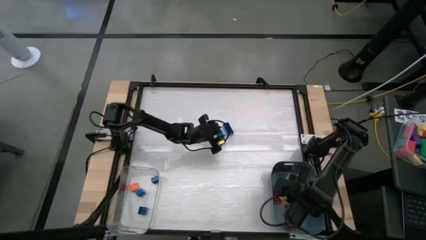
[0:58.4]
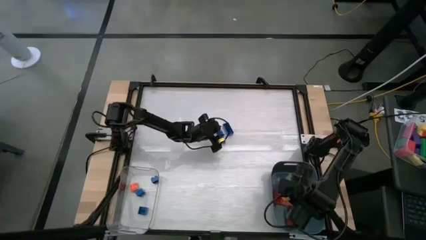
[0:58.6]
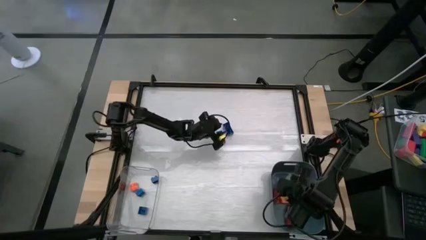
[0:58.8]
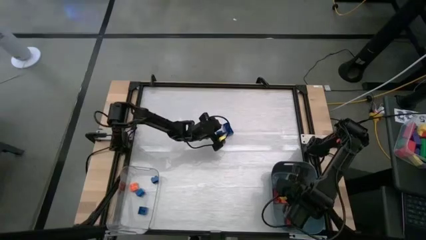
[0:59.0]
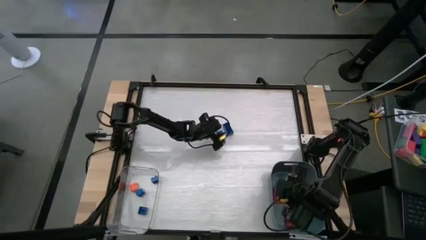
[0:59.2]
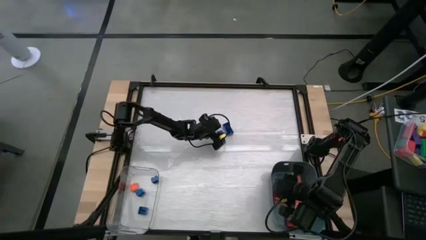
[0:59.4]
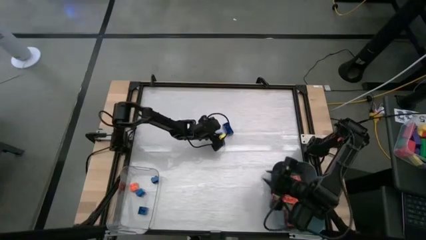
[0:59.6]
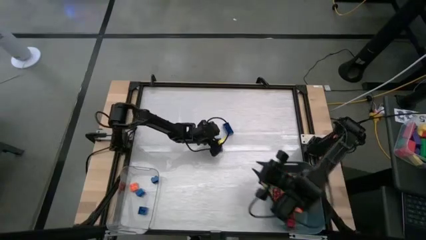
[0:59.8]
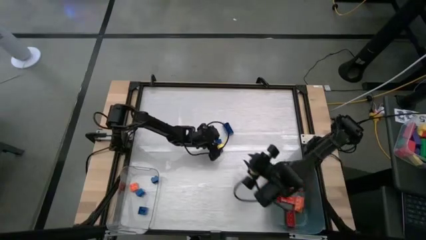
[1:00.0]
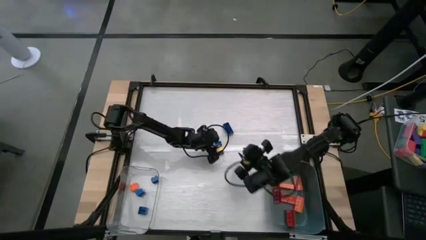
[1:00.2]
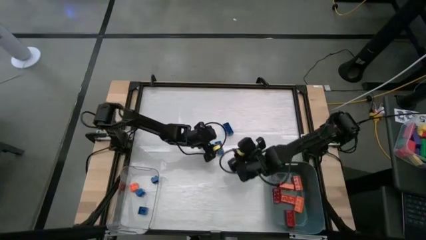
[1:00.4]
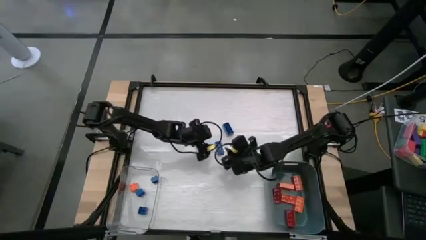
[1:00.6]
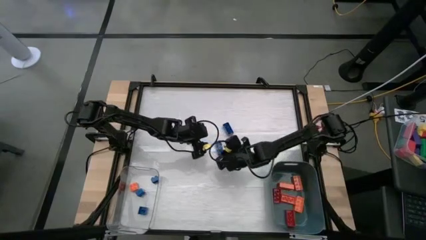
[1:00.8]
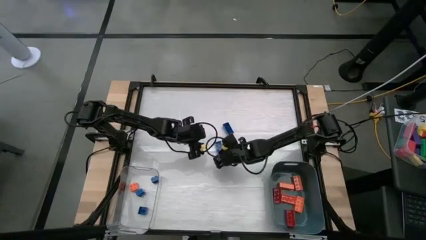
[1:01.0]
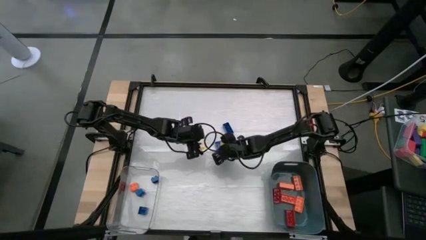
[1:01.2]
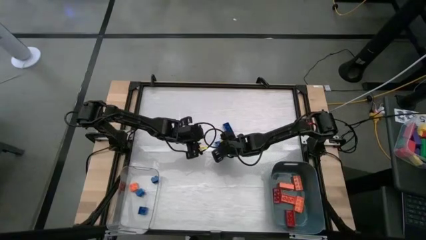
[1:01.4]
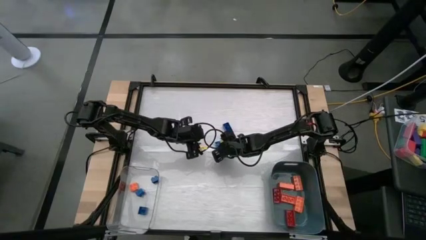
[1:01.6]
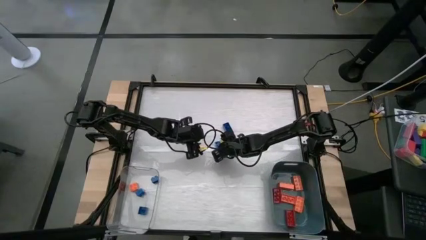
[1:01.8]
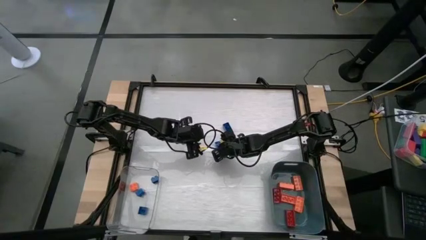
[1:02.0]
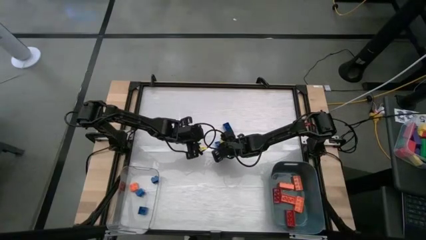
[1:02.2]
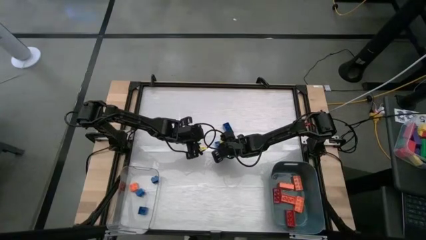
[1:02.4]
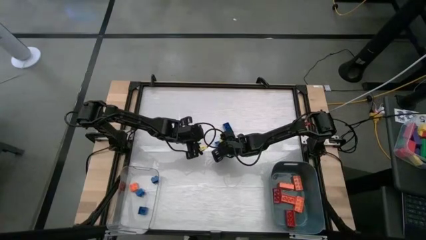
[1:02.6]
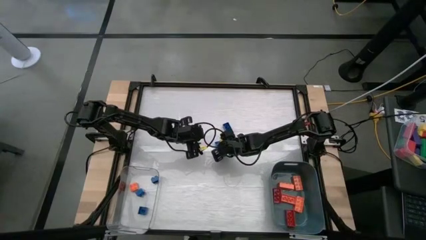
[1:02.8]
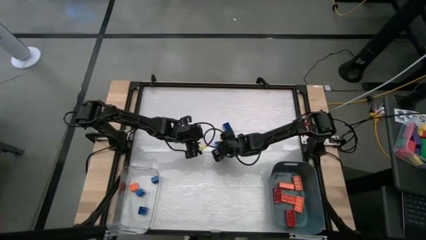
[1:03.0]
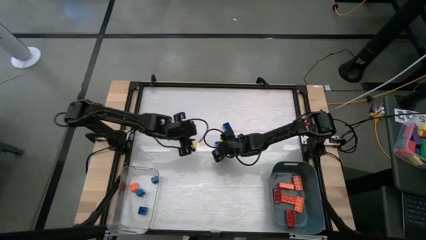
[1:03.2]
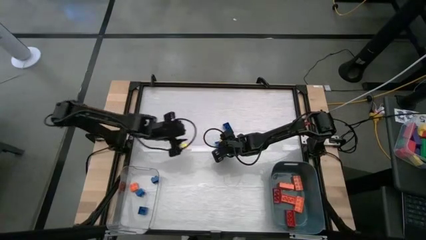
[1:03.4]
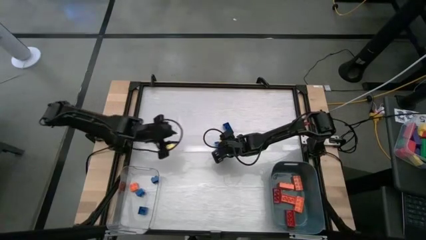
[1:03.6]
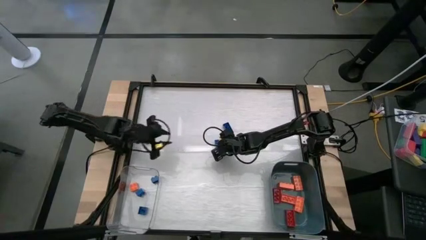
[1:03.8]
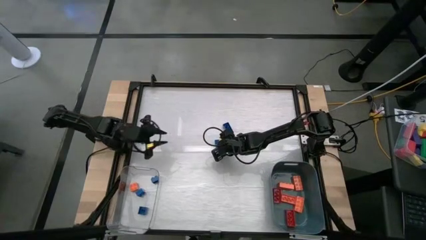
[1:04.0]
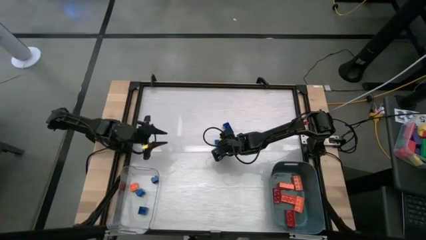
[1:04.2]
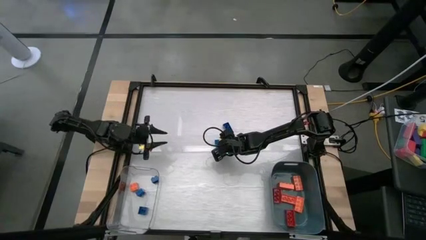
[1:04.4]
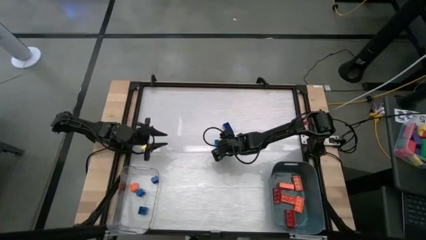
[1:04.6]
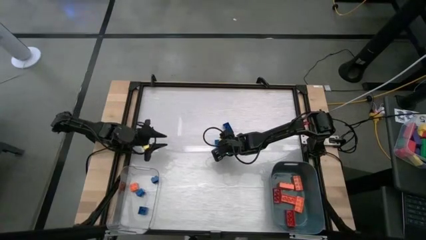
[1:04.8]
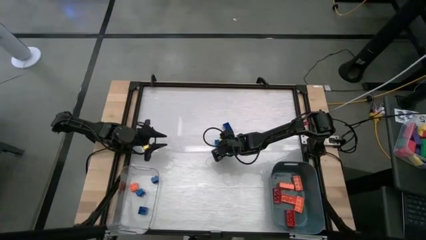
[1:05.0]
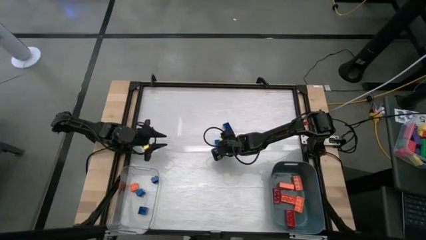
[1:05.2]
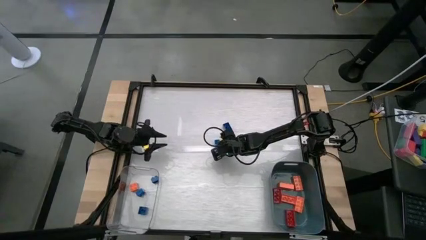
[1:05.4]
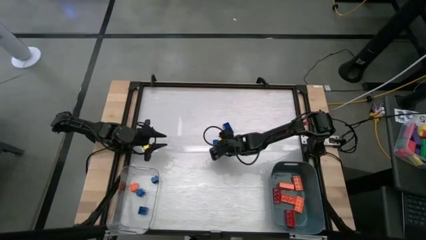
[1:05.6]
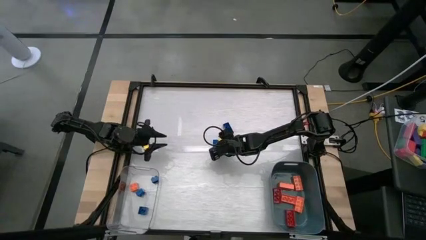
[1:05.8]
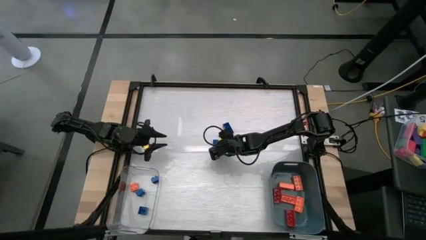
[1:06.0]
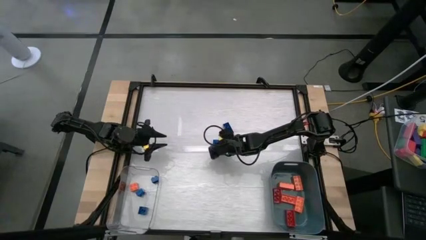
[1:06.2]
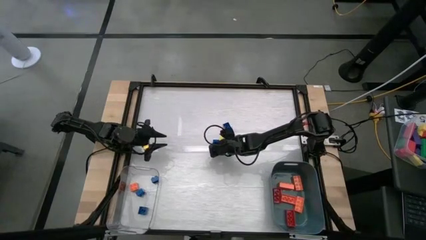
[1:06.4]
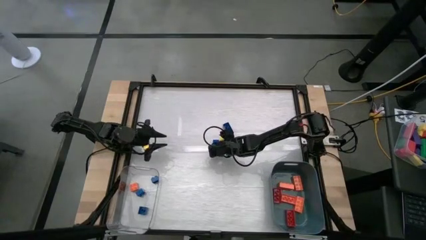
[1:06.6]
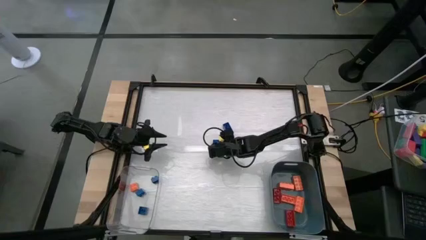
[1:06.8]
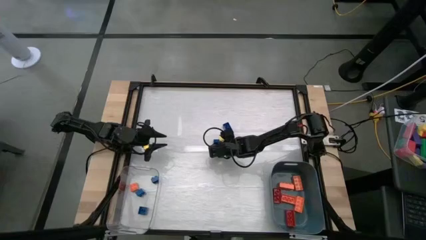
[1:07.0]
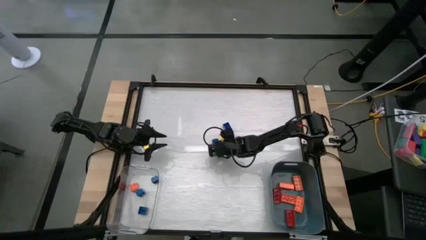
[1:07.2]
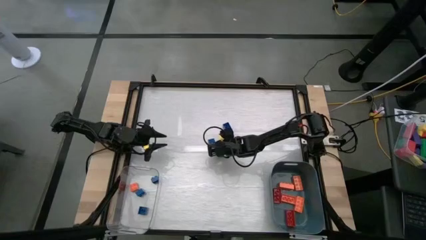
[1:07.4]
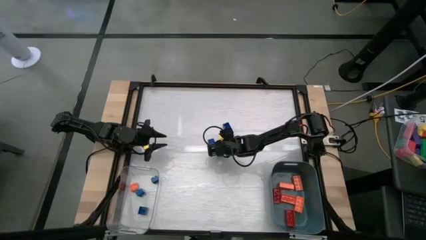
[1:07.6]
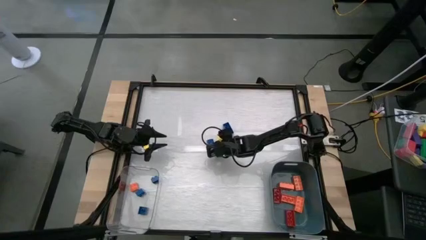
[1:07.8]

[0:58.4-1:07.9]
Task: Sort blocks by size
Put the large blue game piece into the blue bin

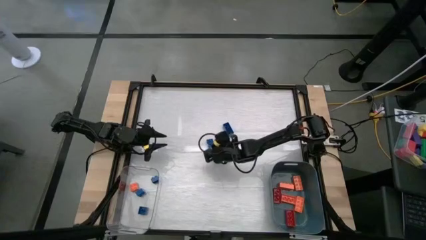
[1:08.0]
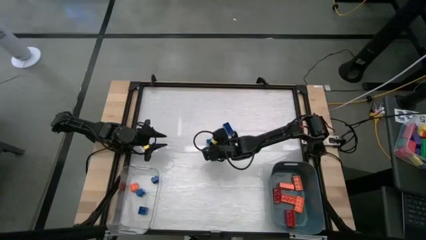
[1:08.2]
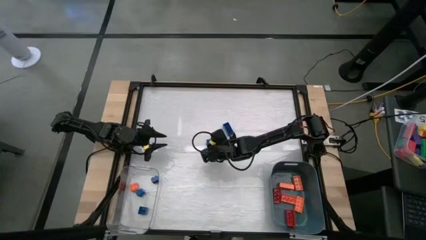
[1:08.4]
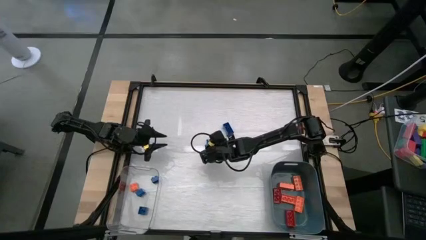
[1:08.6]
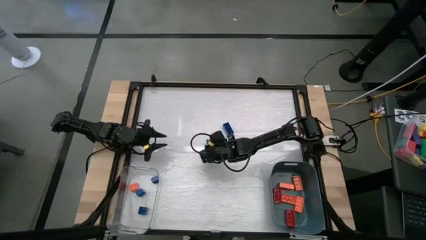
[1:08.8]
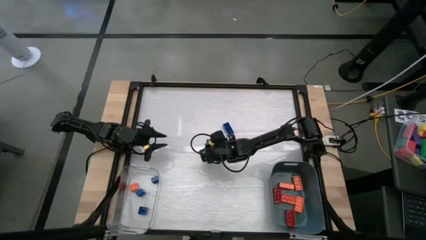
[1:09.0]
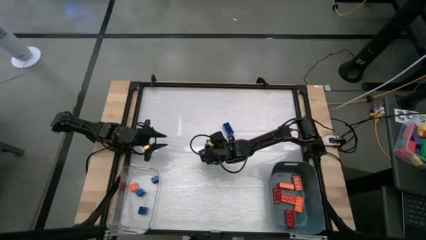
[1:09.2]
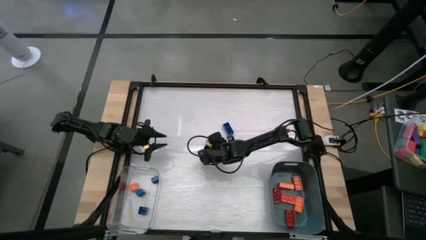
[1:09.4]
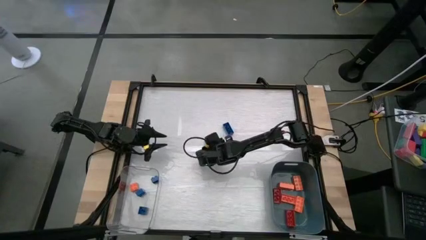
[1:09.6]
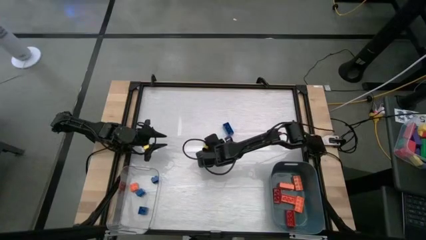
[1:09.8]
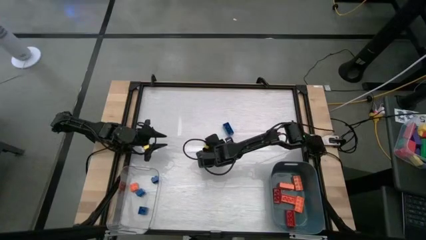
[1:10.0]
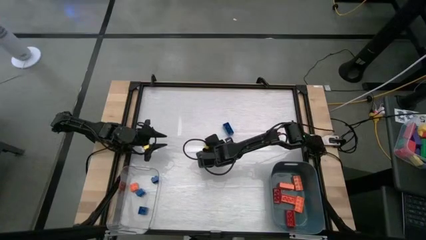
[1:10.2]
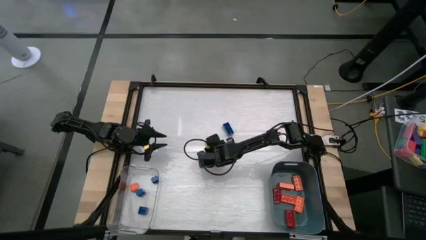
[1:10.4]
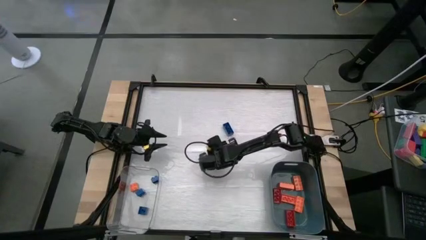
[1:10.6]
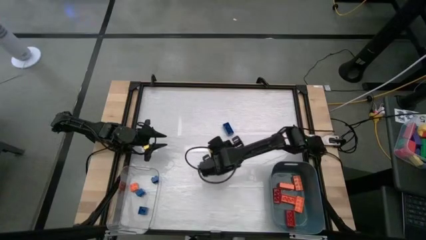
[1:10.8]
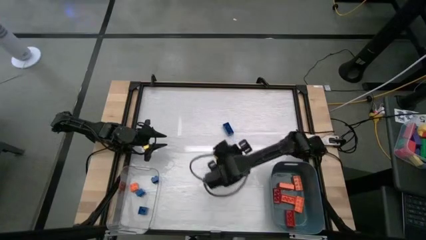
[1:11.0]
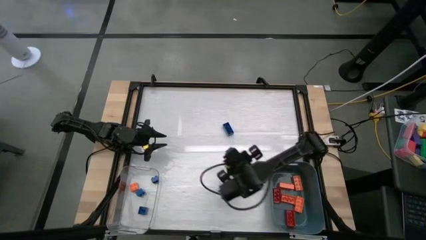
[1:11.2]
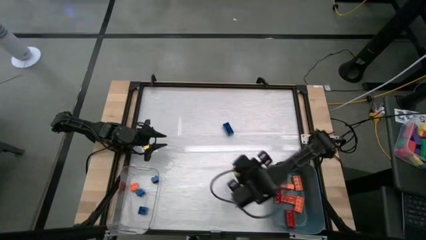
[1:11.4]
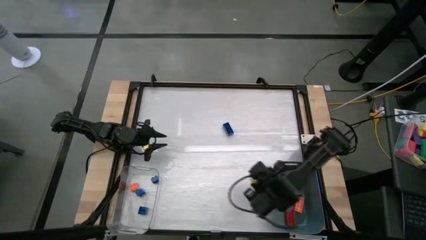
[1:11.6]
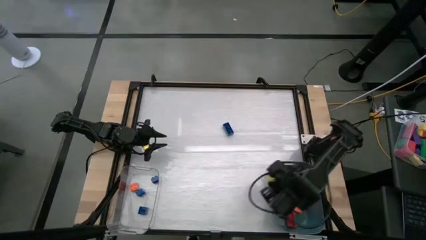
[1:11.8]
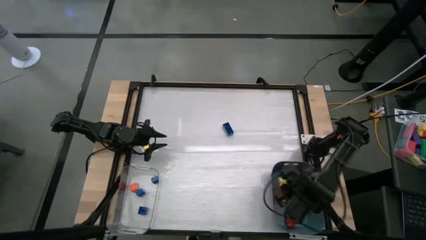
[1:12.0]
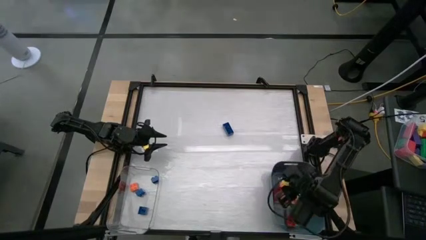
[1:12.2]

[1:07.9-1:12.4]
Put the large blue game piece into the blue bin

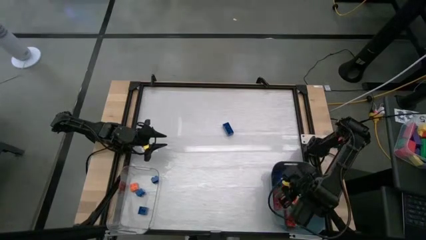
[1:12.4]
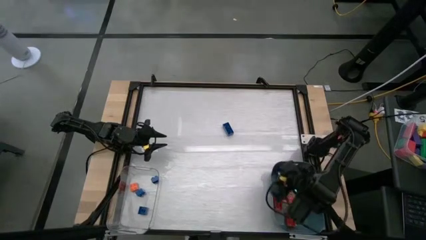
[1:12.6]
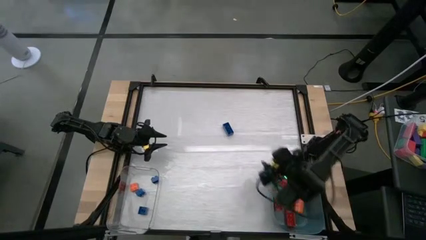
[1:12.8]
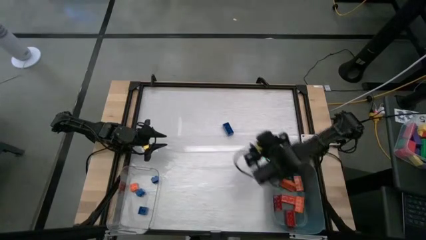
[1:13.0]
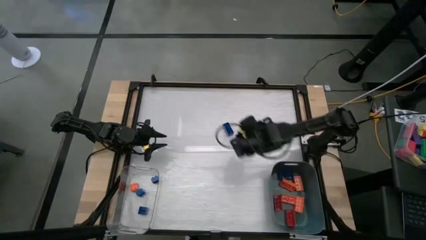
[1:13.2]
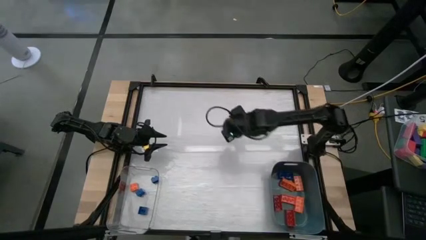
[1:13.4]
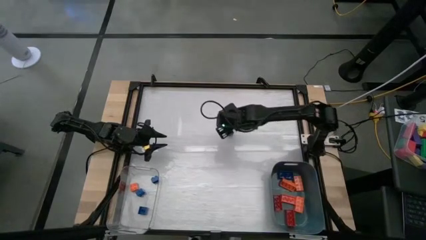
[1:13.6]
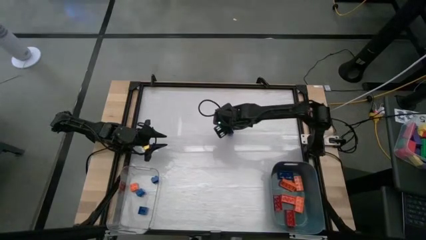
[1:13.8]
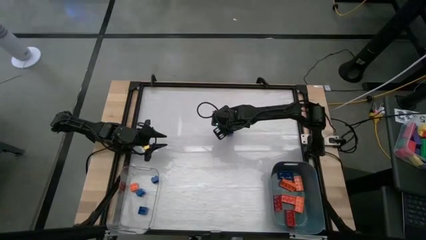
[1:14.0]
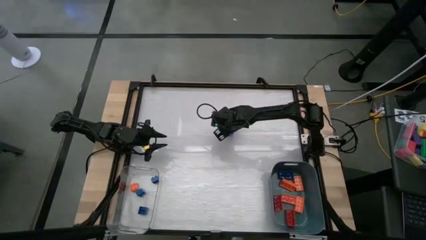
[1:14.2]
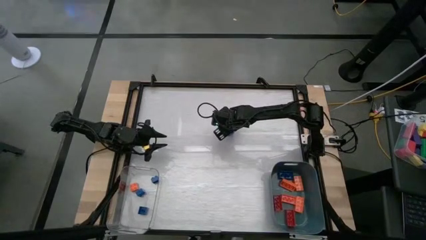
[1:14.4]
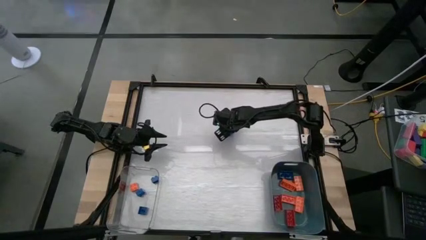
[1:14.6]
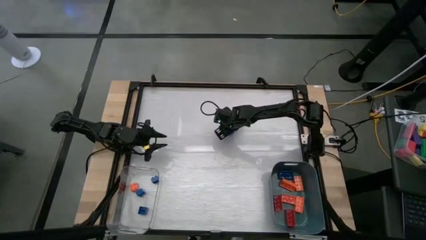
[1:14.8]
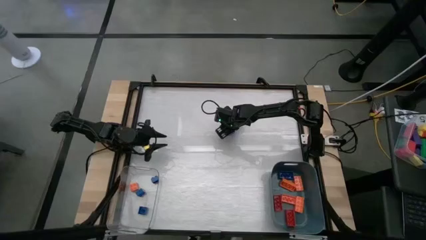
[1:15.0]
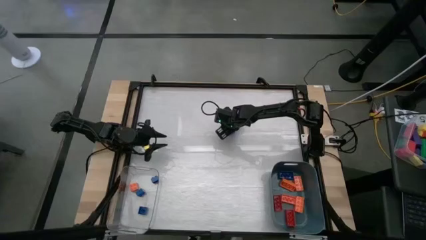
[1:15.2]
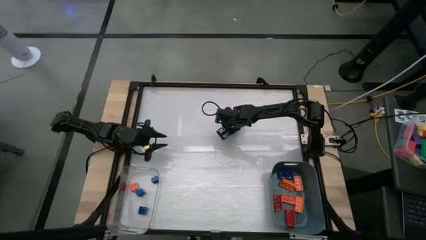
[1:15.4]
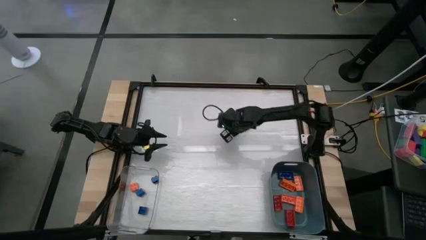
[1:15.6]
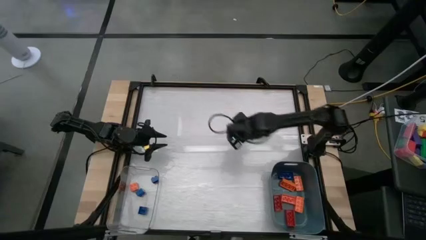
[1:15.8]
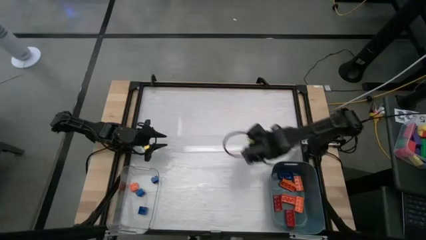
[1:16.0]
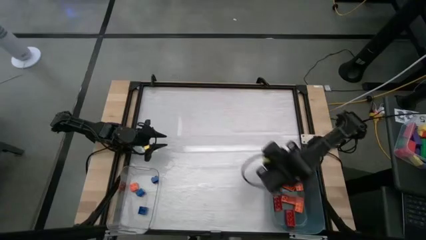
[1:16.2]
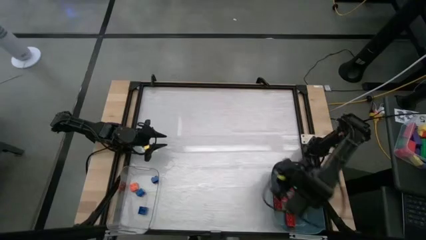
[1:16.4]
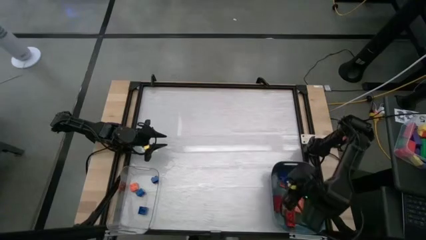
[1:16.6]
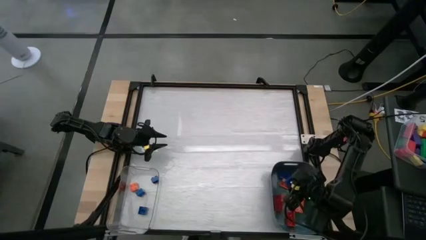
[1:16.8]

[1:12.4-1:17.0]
Put the large blue game piece into the blue bin
